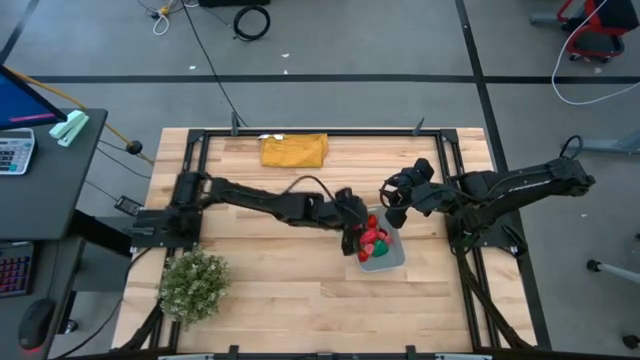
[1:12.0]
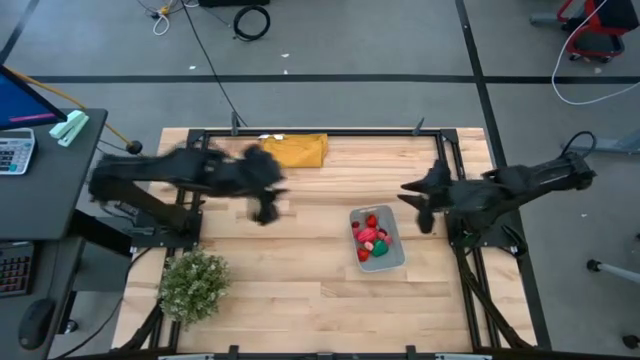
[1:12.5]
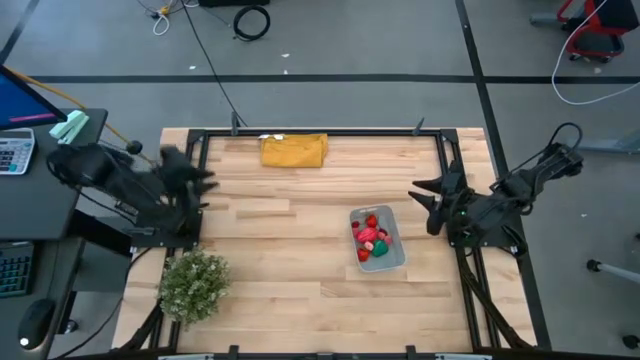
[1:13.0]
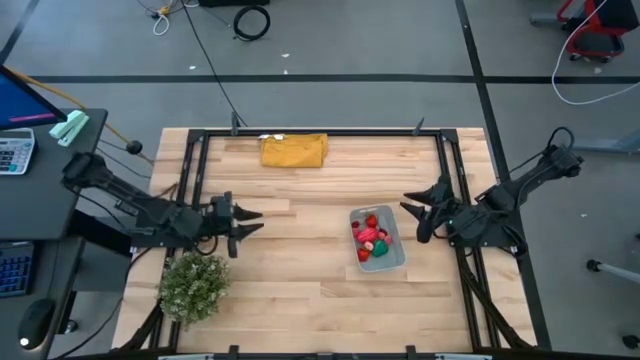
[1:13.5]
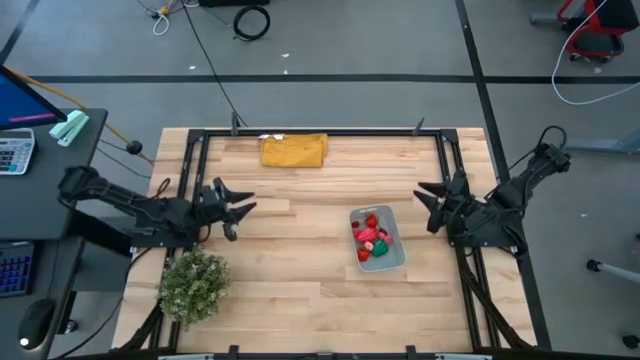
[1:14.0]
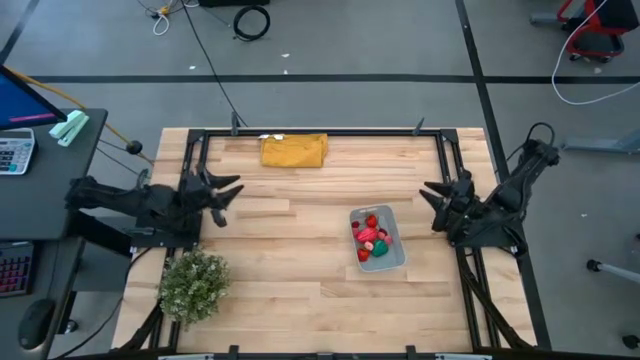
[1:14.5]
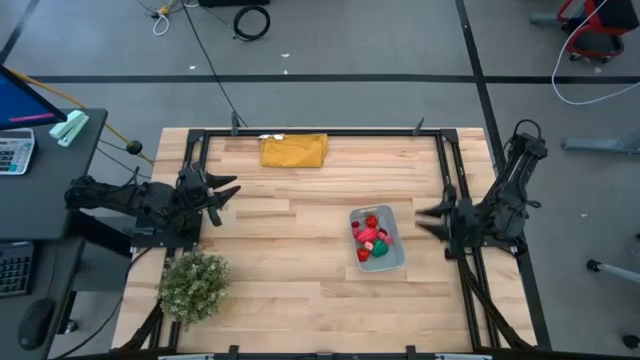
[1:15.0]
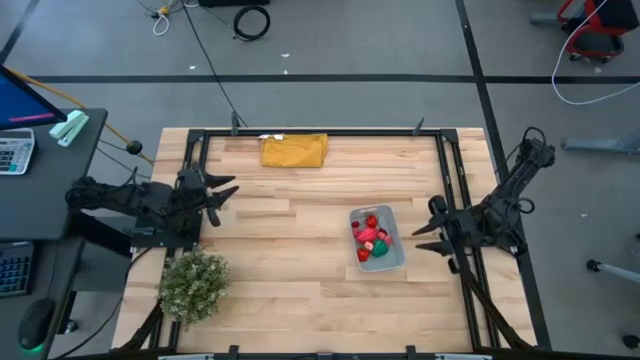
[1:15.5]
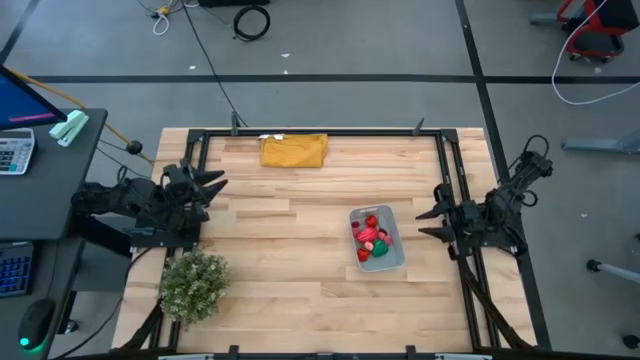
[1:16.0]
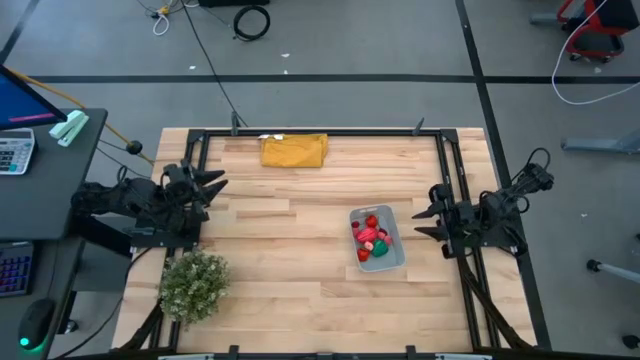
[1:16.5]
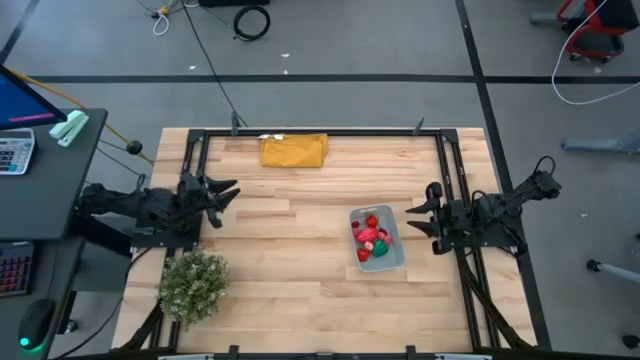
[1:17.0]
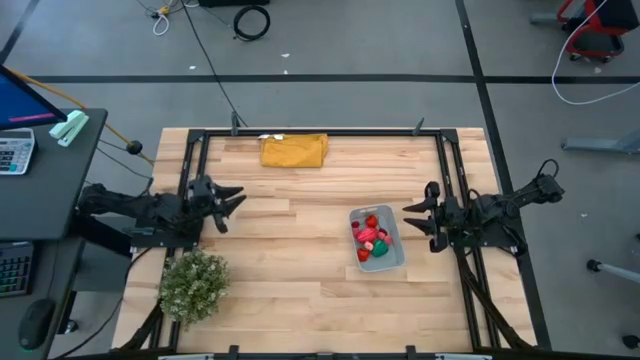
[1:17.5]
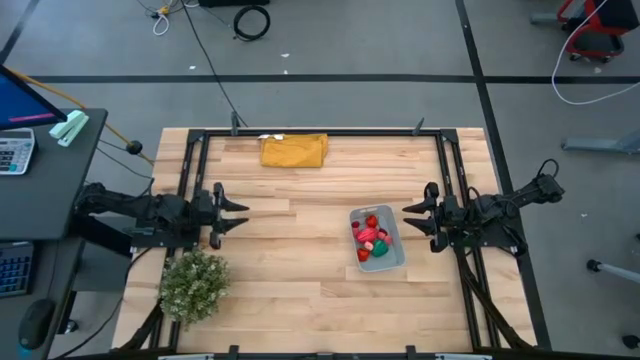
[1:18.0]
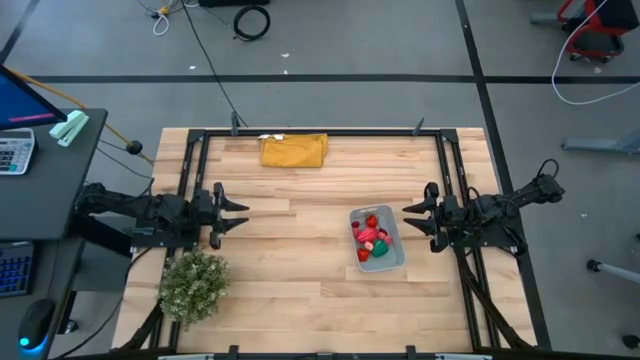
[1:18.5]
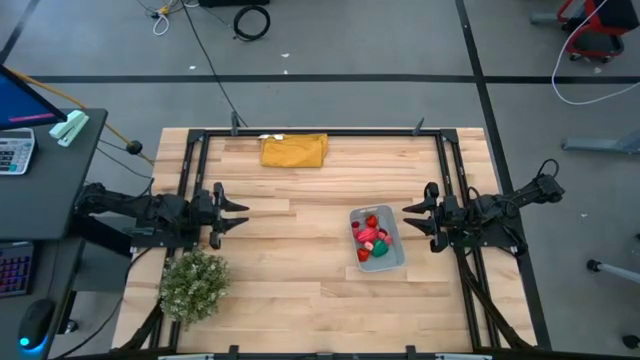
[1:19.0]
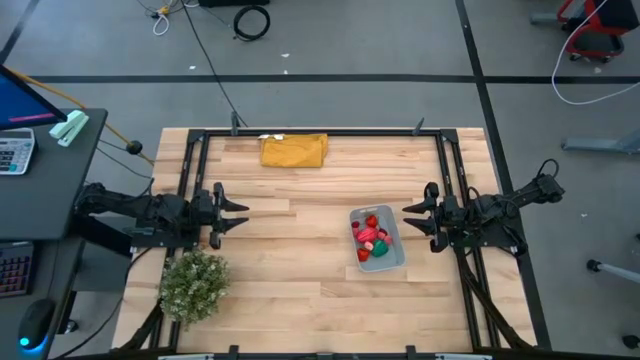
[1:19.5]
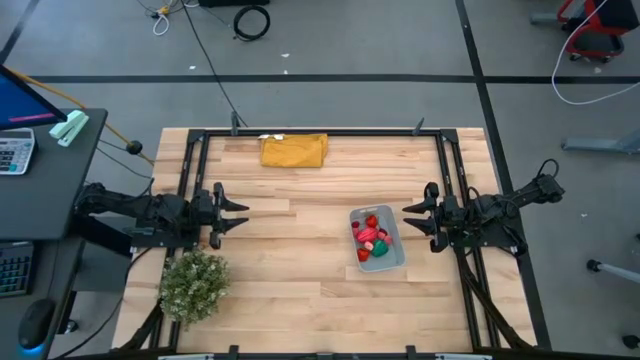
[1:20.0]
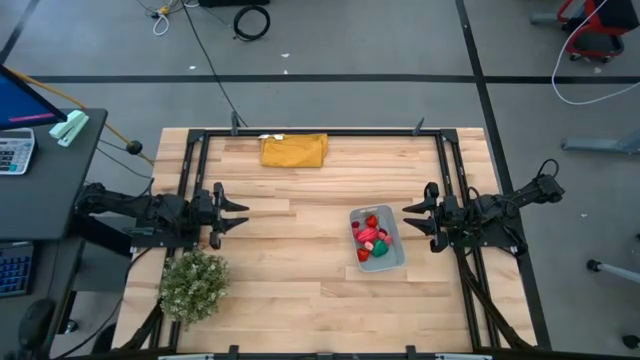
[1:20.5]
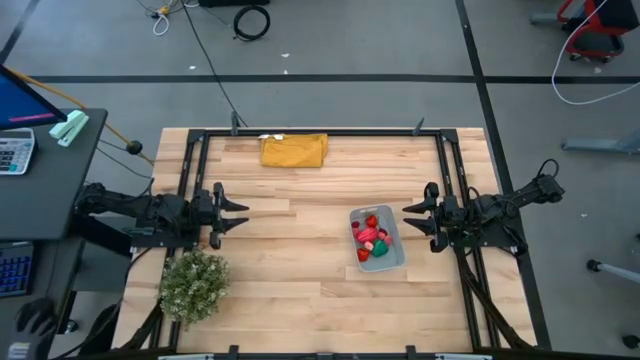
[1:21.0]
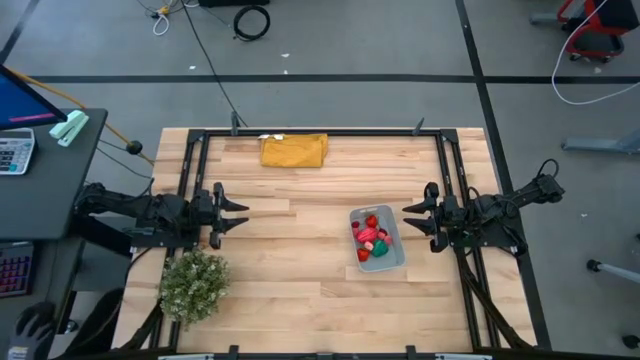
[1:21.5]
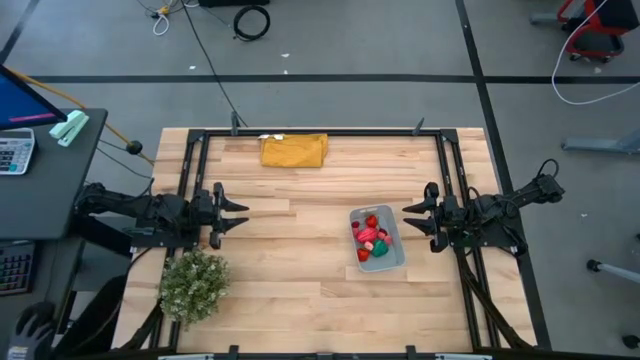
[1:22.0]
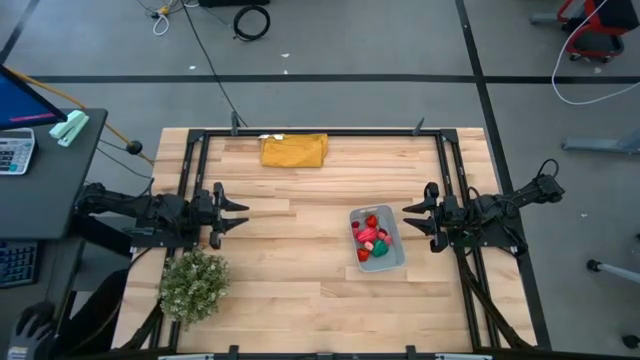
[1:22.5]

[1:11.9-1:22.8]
Task: Pick and placing Produce into tupperware
Return to Home Position

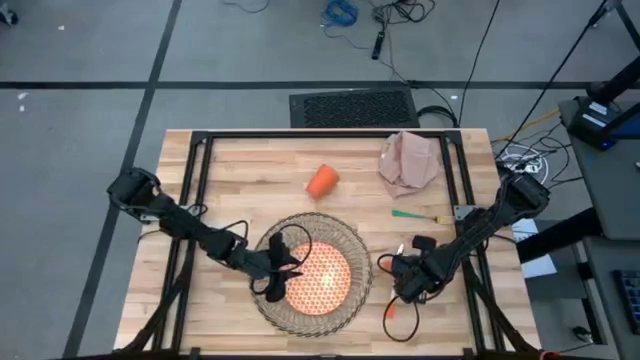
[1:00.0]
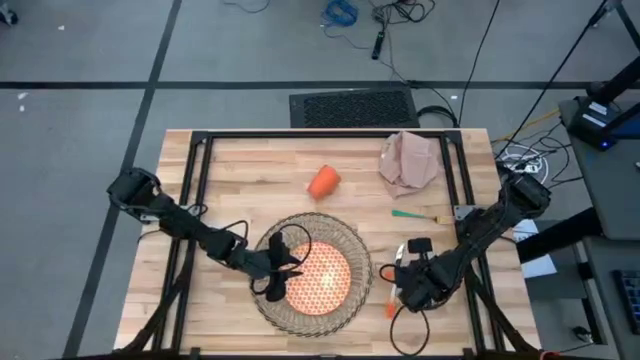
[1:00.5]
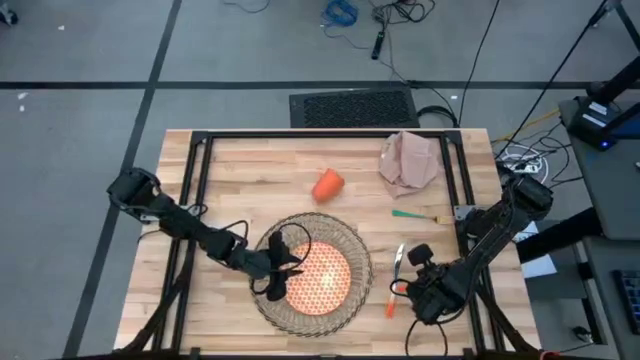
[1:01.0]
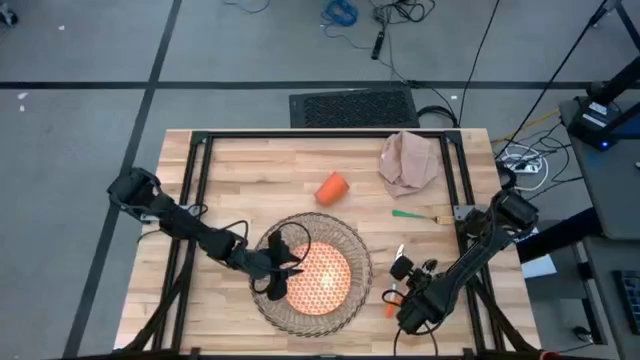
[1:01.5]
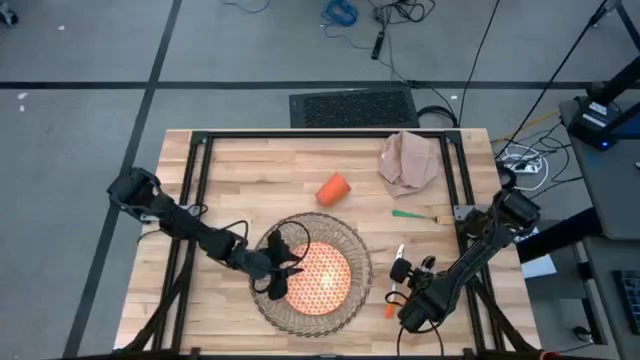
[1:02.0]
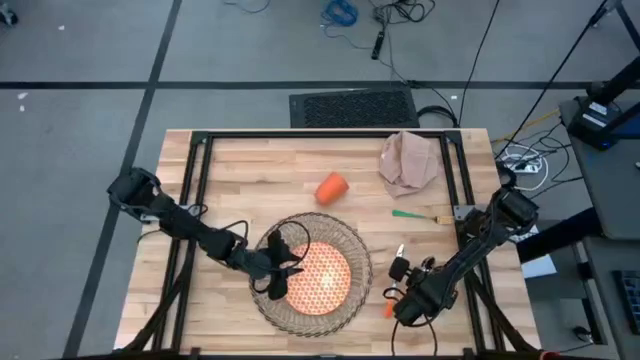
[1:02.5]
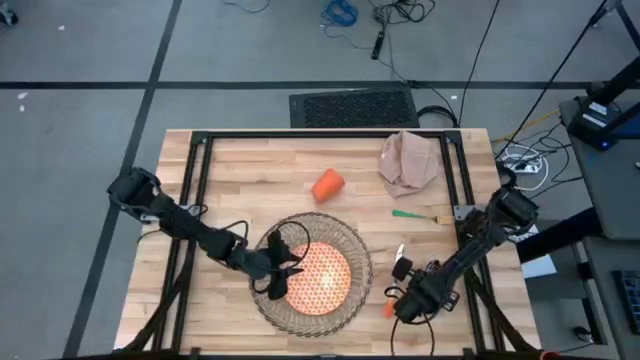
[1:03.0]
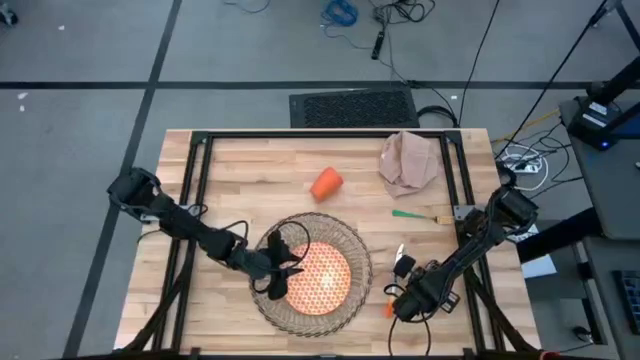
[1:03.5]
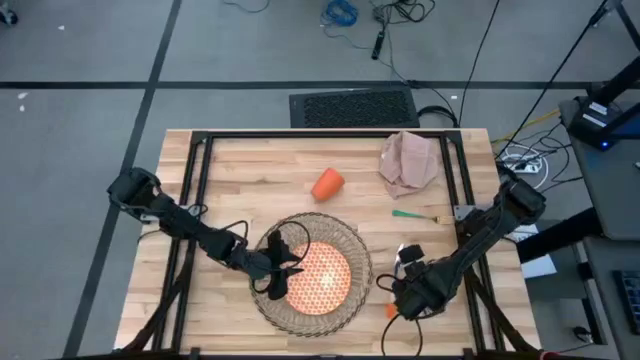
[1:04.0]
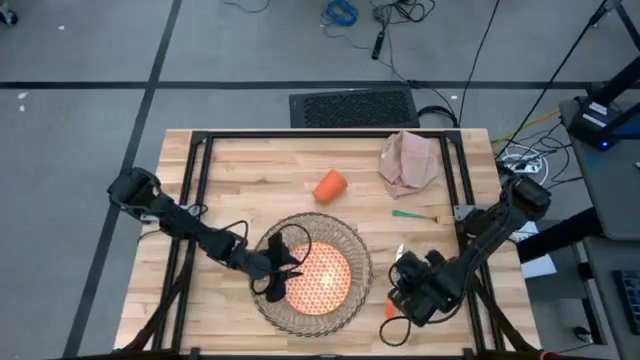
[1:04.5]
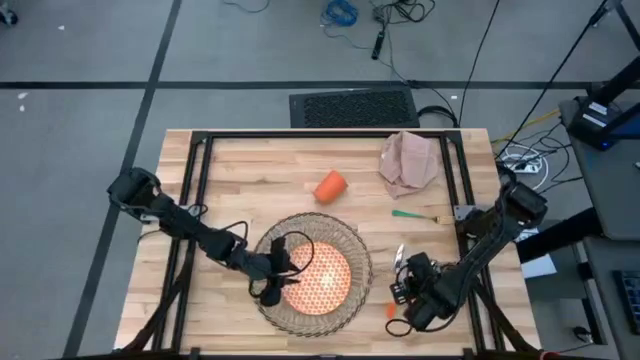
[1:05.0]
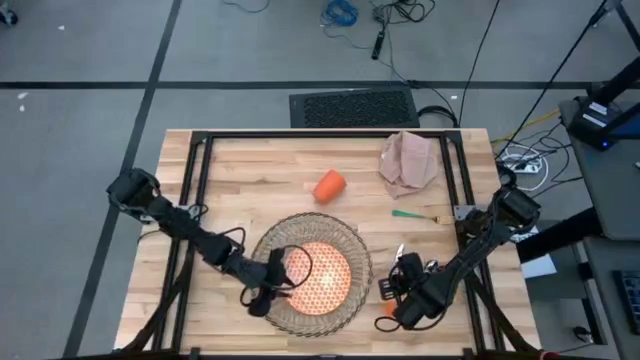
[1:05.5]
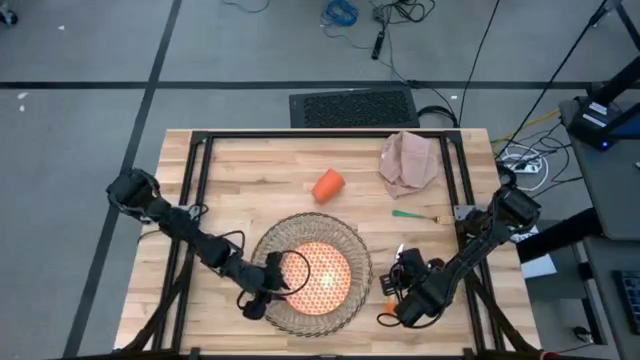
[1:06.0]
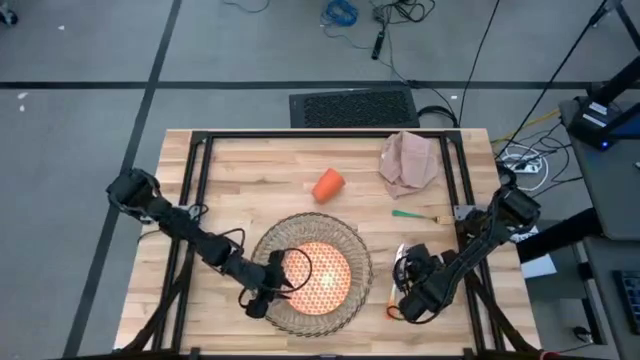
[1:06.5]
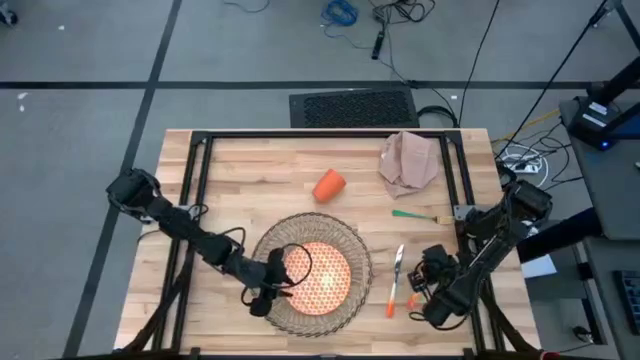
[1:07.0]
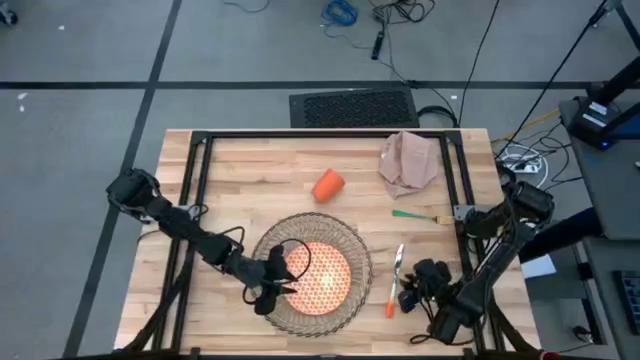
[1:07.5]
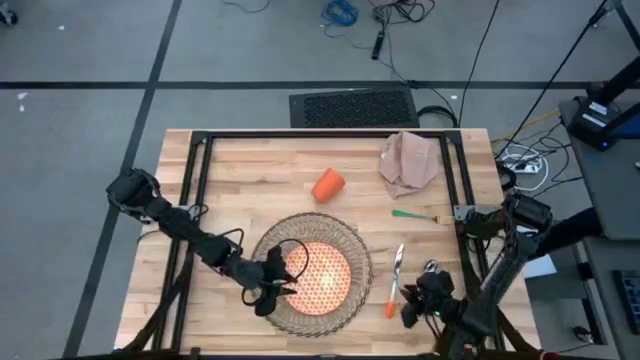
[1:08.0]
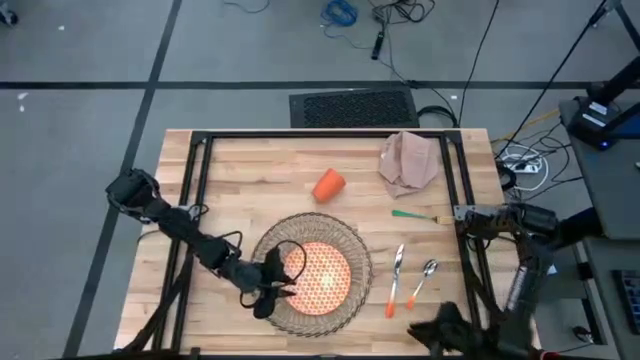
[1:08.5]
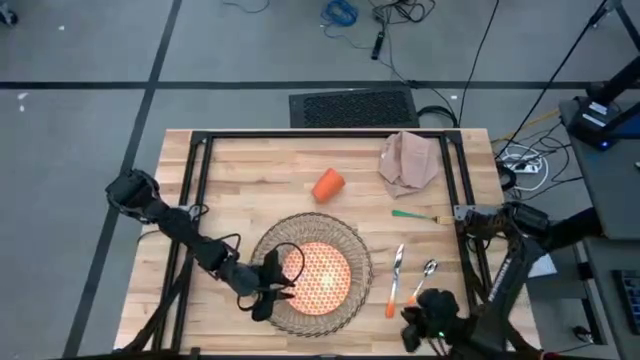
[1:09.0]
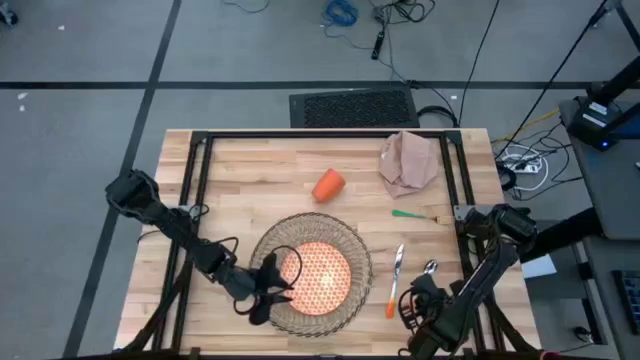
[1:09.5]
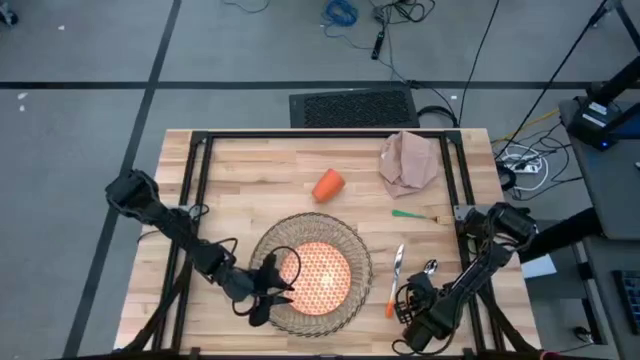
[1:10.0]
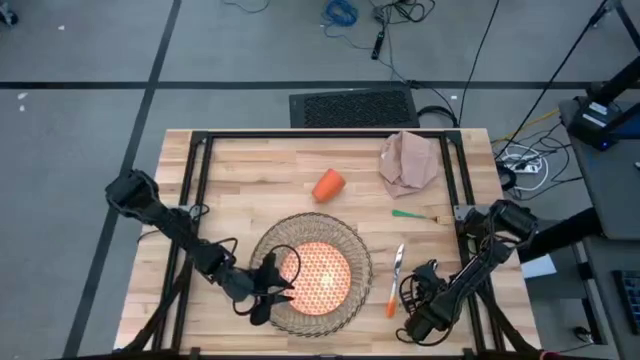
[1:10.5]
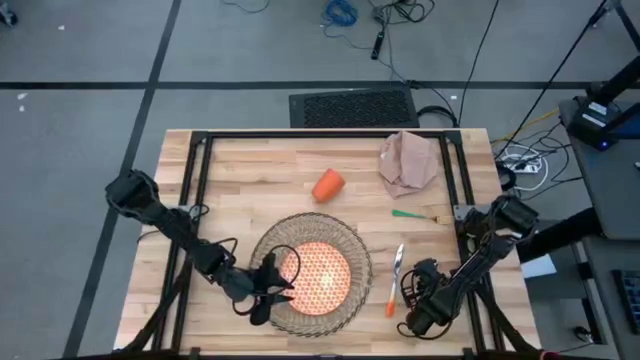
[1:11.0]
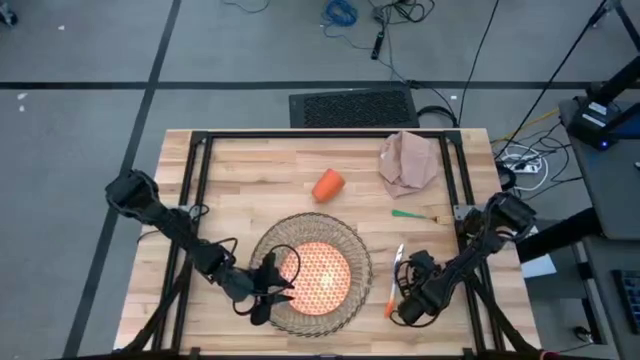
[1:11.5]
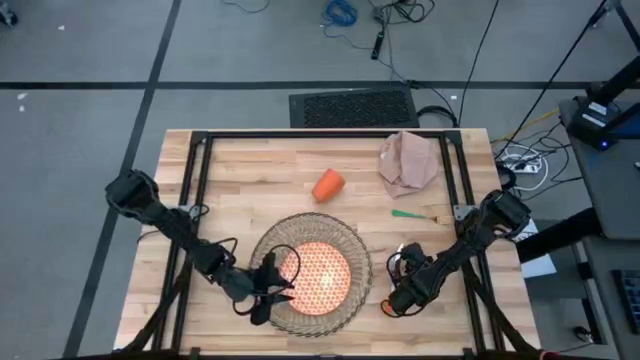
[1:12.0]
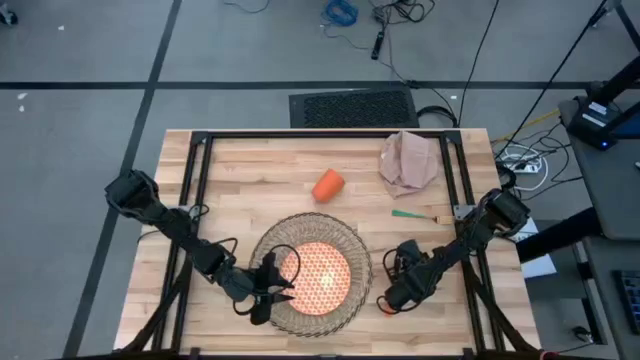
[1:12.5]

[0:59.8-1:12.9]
Task: Set table place
Put the orange spoon to the right of the orange knife
